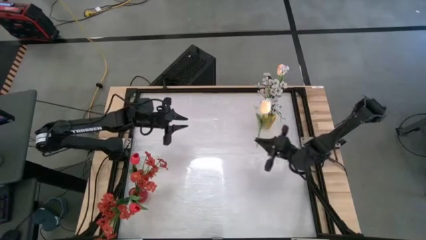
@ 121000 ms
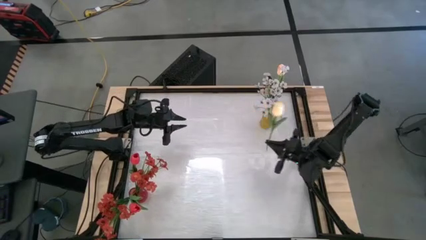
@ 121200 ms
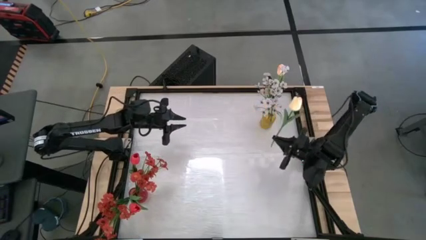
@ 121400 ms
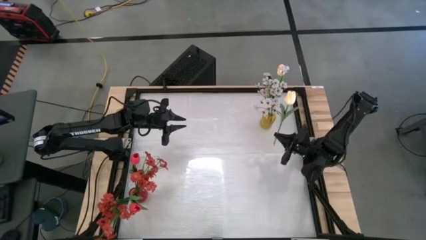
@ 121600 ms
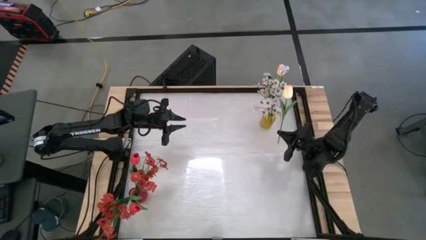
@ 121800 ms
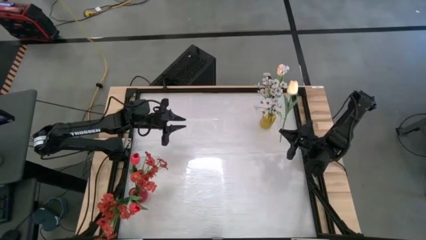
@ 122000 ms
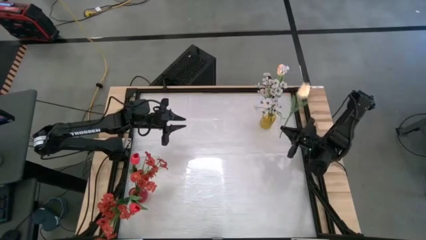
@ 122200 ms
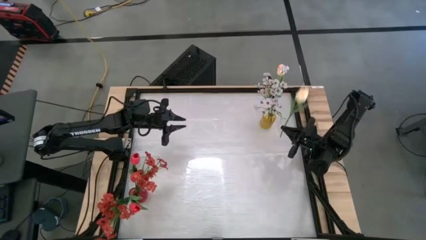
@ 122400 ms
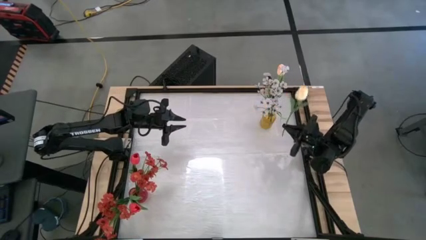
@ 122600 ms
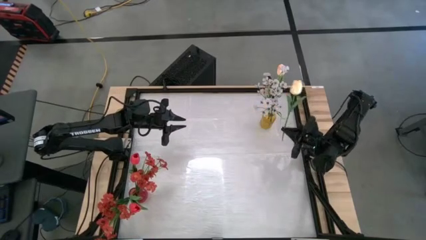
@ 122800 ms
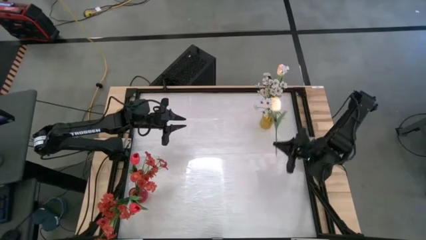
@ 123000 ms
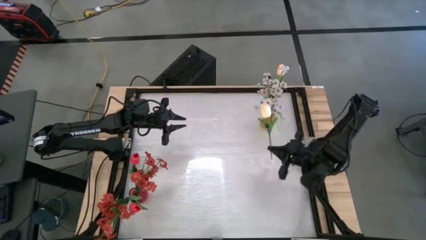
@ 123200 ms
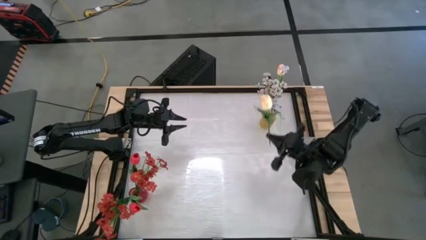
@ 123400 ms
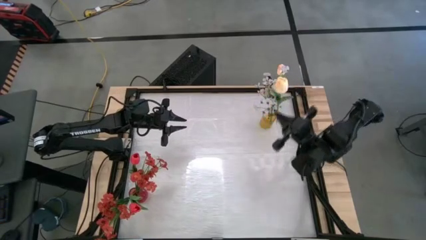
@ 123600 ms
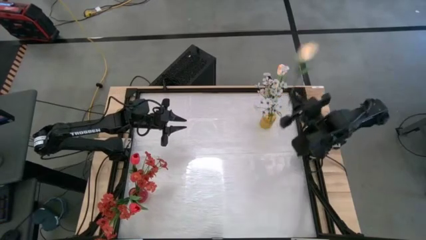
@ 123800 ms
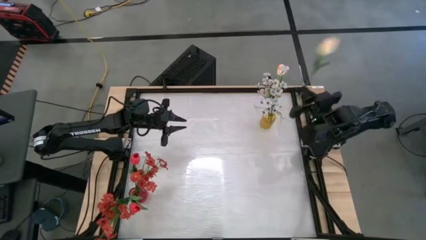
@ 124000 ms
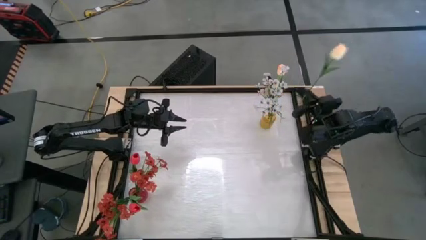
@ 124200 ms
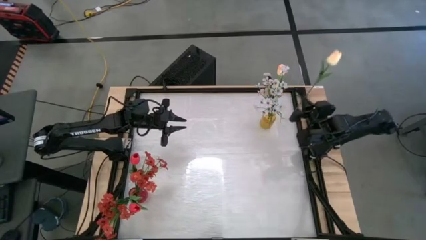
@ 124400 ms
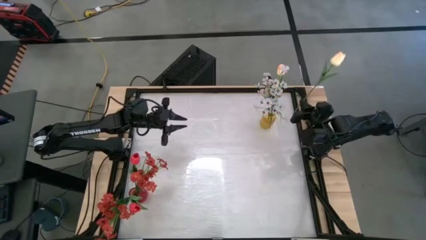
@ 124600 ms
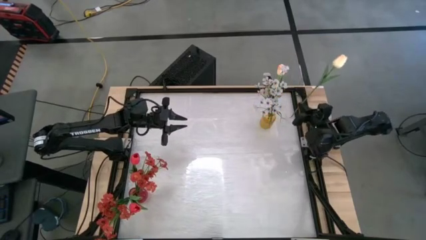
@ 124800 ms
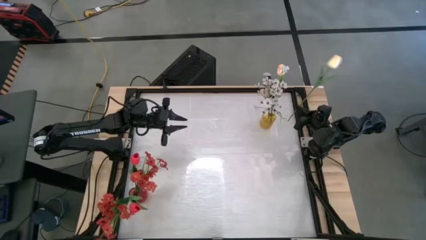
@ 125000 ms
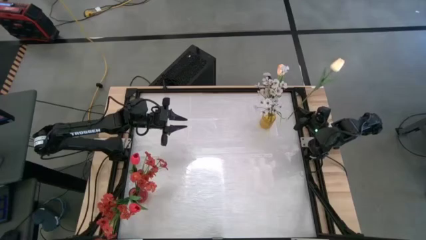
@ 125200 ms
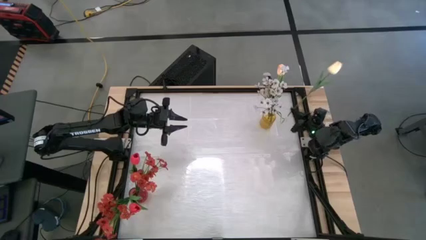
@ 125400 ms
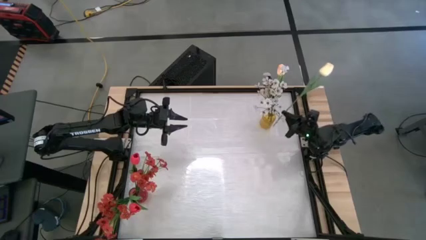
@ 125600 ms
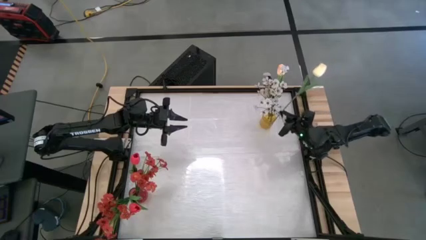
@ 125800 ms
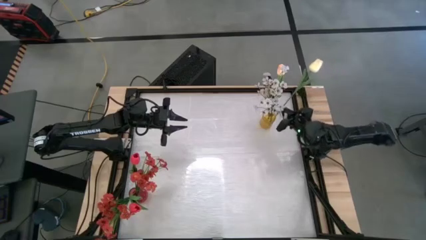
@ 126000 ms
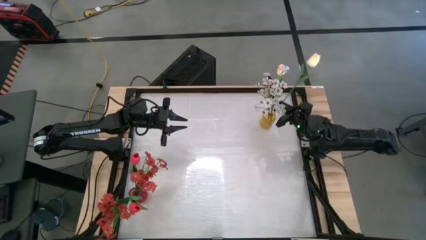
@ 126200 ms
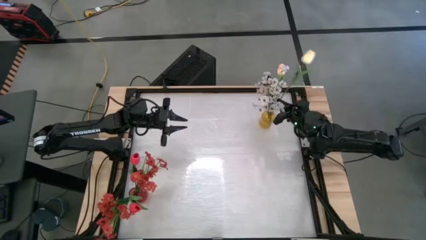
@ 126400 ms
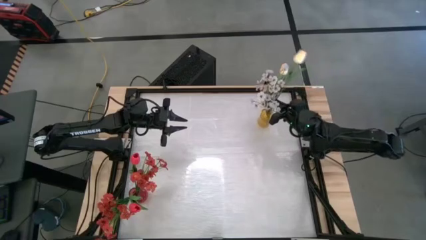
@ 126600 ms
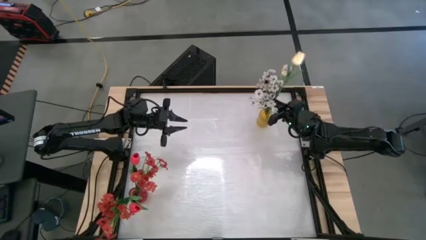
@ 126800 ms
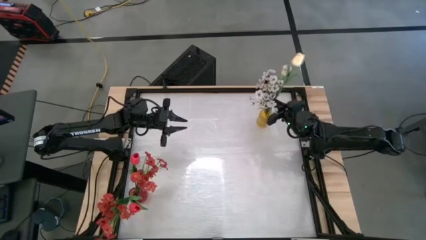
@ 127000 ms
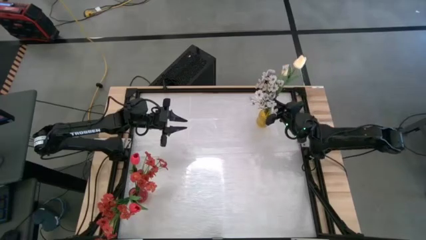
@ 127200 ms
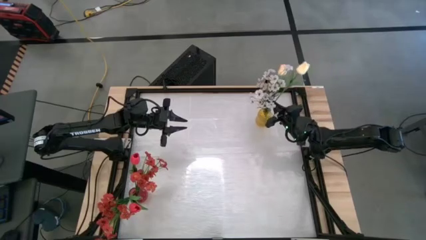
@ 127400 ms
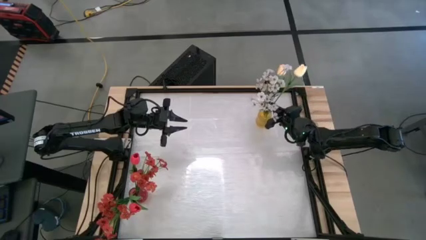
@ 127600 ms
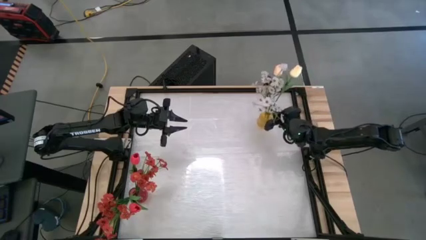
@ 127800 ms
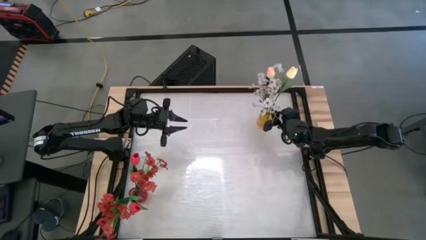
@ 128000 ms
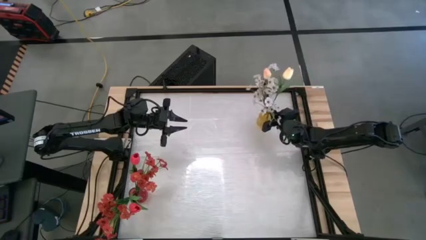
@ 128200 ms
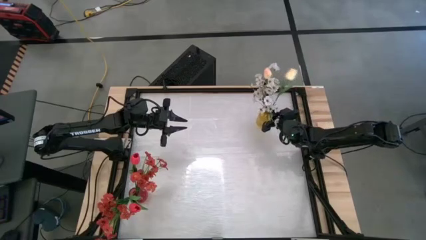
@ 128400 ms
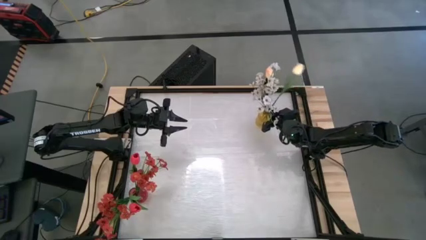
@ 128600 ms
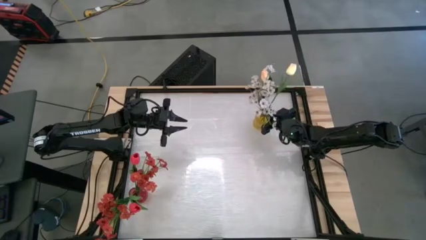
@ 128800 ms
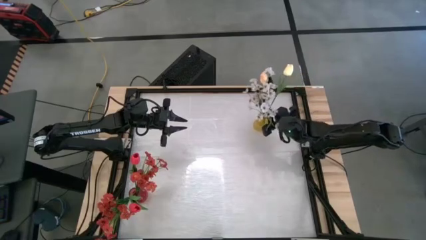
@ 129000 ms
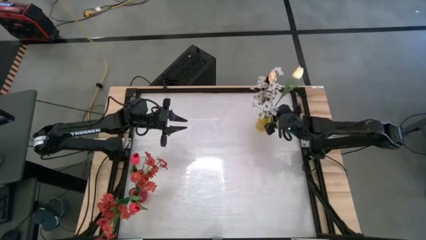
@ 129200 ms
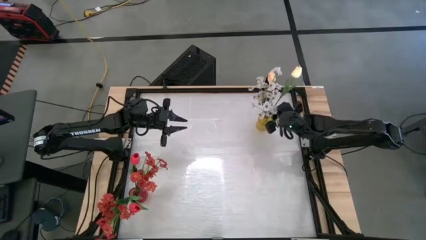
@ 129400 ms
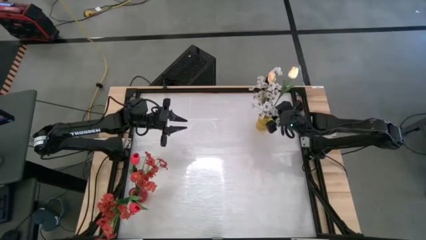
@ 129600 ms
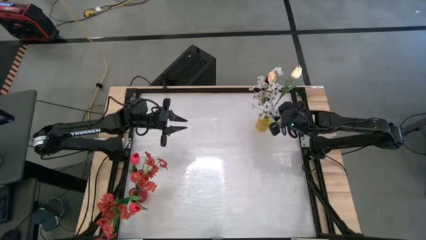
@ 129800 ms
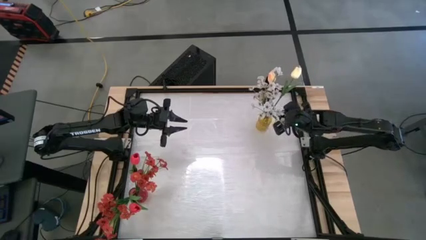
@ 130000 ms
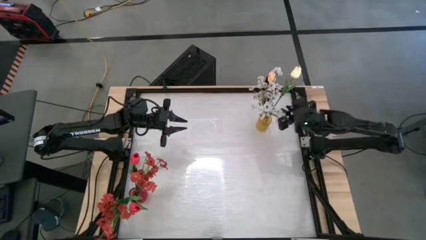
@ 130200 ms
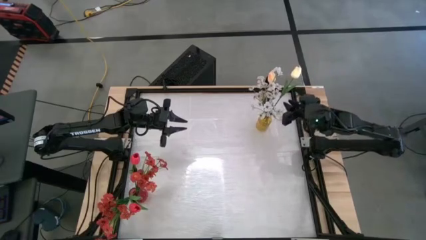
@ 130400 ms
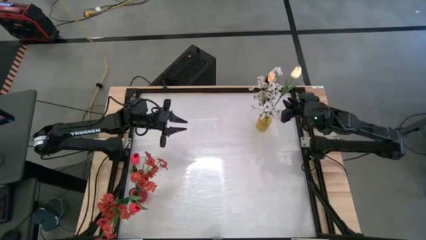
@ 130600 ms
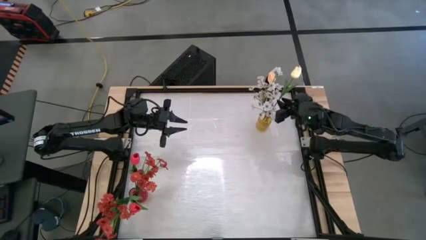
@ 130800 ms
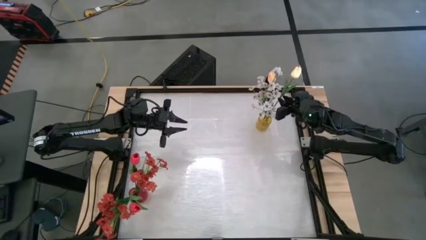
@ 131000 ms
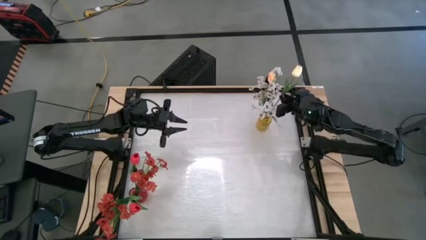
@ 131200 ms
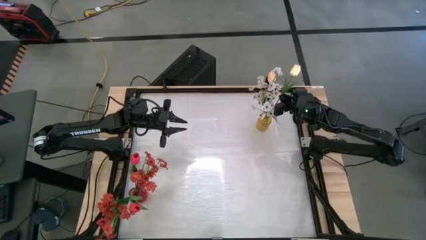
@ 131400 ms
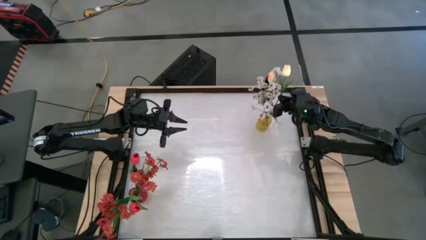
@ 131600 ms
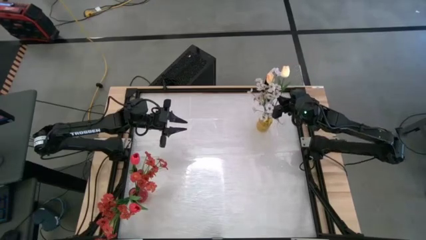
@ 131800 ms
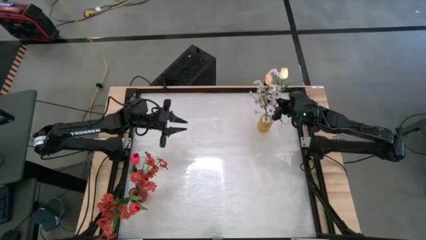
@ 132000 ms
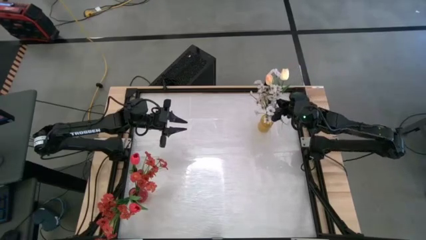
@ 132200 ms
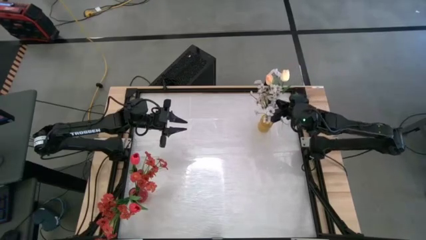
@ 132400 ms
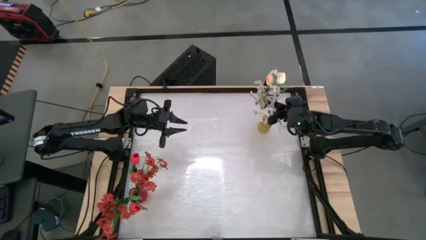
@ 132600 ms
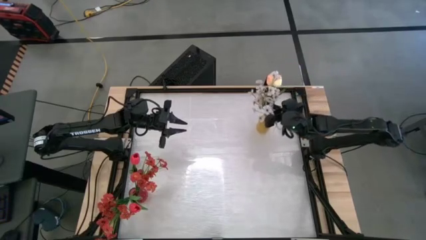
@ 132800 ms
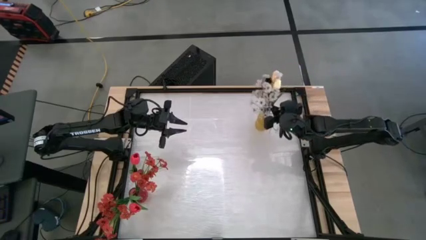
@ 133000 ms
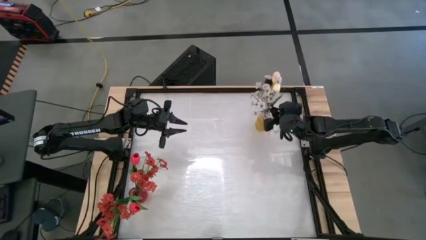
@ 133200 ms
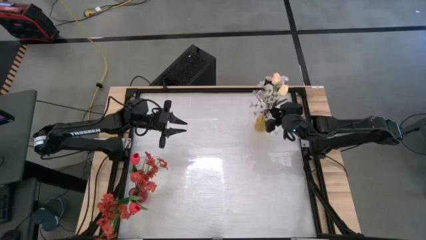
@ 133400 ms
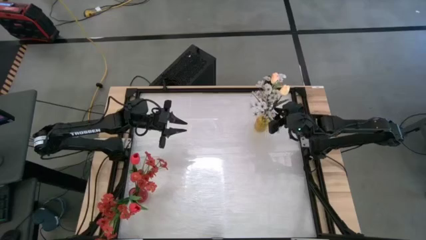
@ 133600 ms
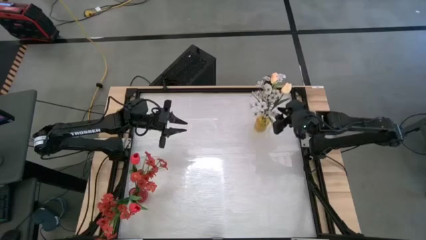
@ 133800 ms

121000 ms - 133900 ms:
Task: Sort flowers into vase by color
Put the white tulip into the yellow vase
